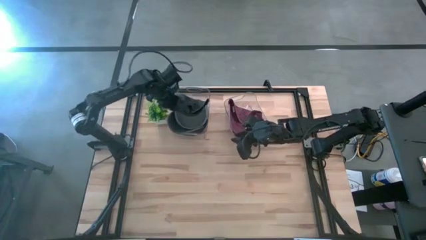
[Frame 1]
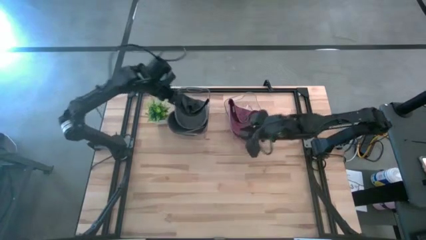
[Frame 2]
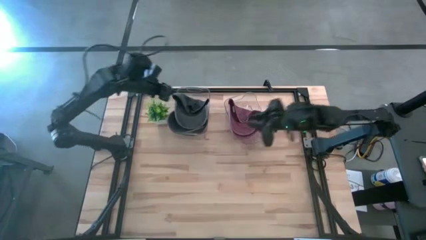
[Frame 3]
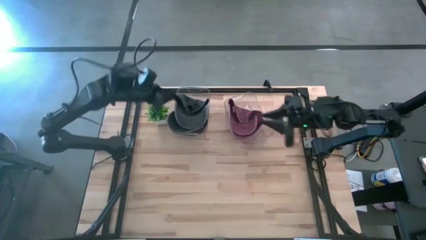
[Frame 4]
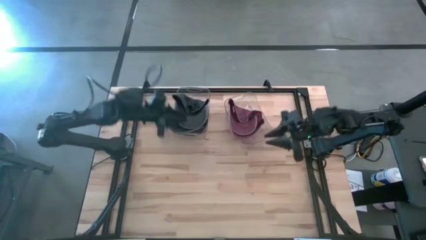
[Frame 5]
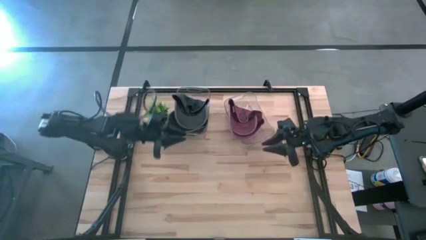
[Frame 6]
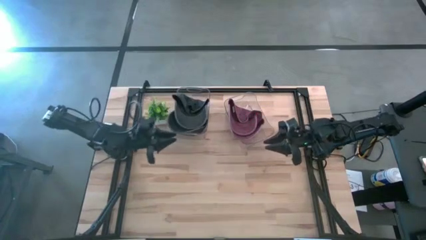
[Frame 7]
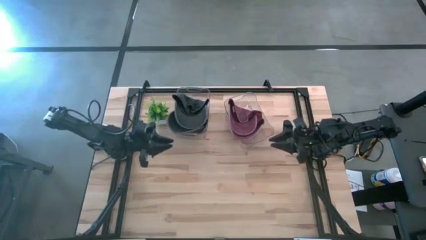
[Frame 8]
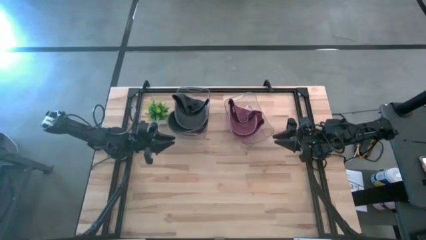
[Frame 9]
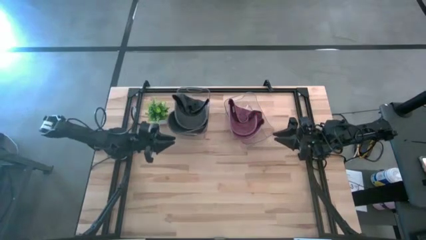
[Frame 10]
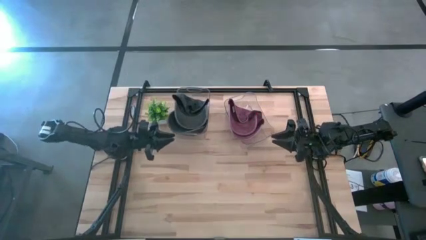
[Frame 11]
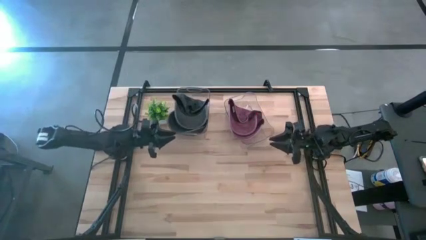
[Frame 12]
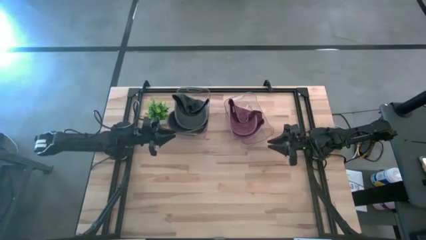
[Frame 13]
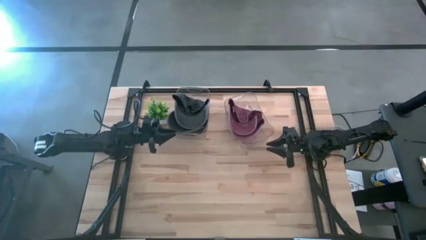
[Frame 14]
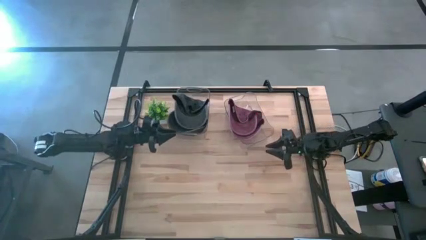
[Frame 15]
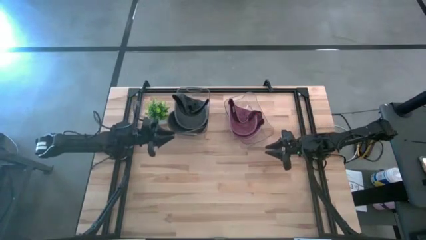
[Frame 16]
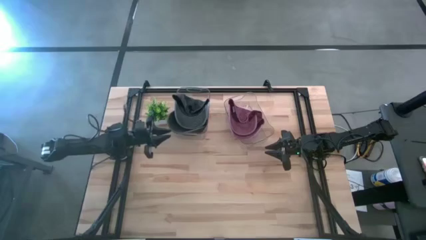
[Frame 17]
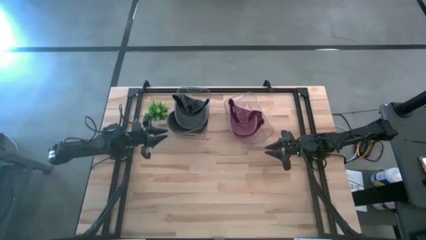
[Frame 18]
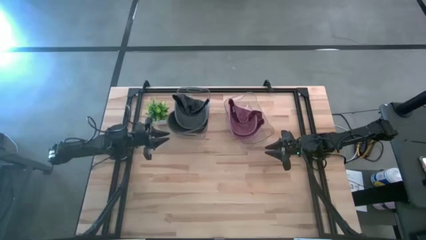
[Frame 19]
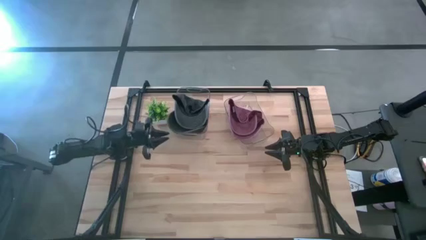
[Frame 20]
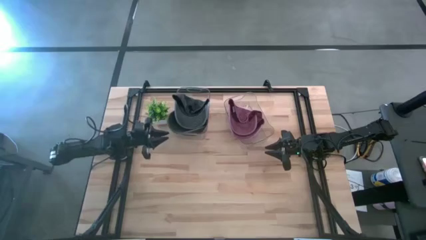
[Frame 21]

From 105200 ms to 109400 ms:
Task: Pick & Place hat
Return to Home Position

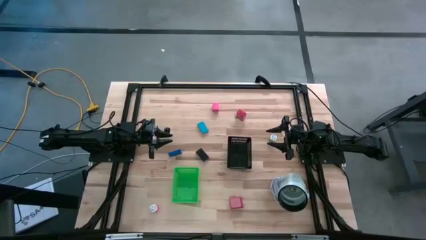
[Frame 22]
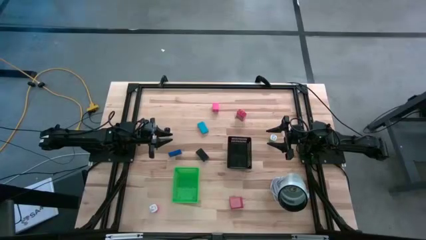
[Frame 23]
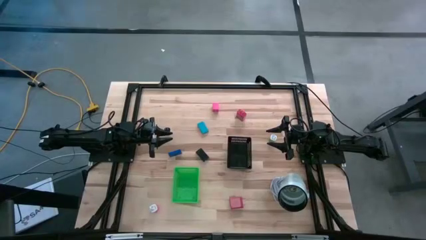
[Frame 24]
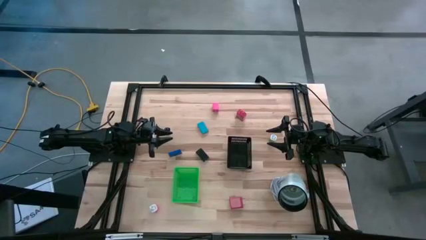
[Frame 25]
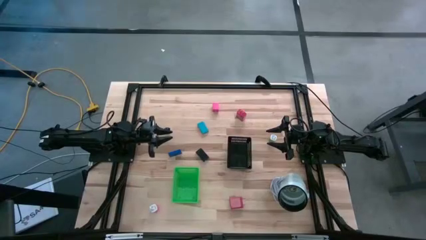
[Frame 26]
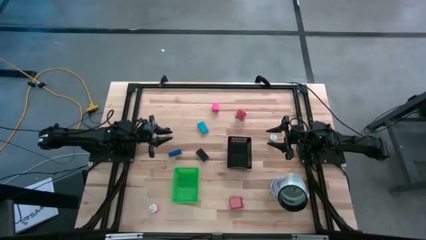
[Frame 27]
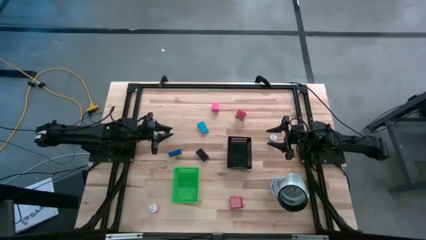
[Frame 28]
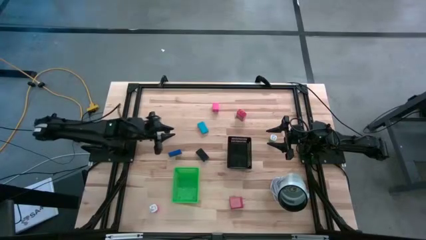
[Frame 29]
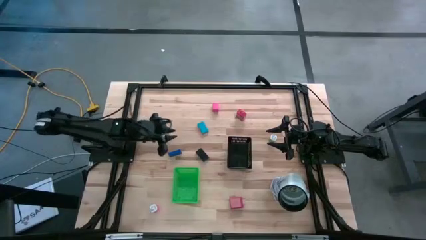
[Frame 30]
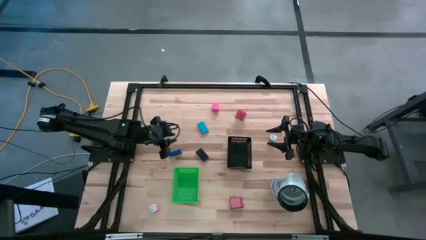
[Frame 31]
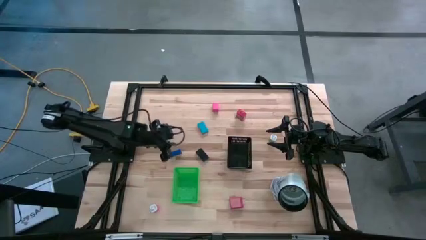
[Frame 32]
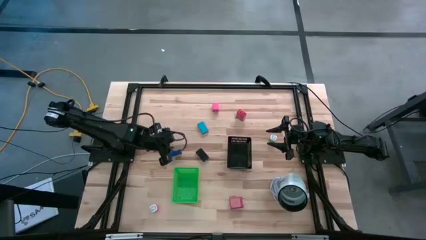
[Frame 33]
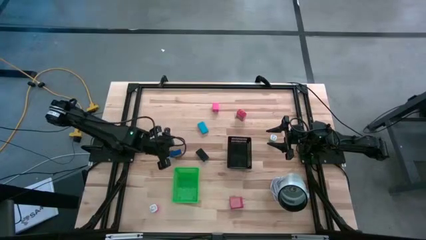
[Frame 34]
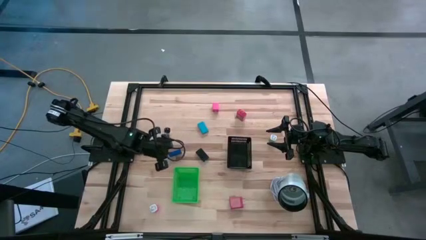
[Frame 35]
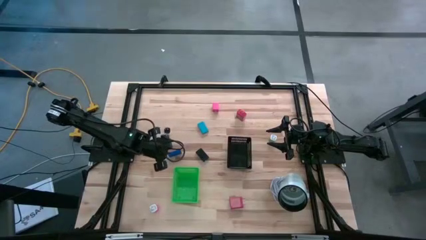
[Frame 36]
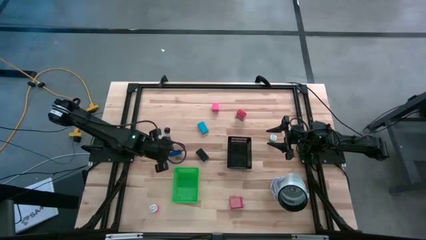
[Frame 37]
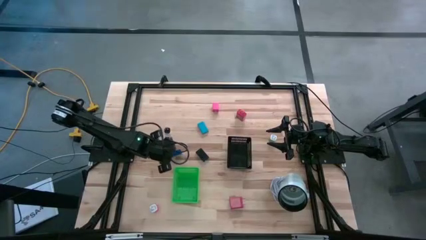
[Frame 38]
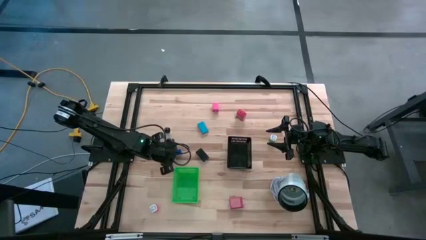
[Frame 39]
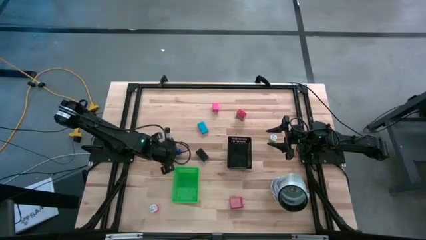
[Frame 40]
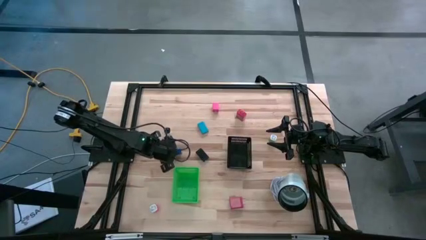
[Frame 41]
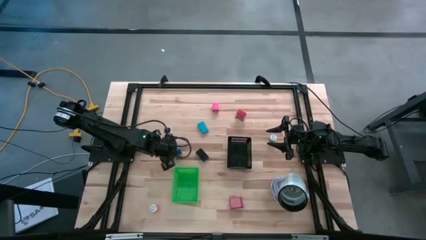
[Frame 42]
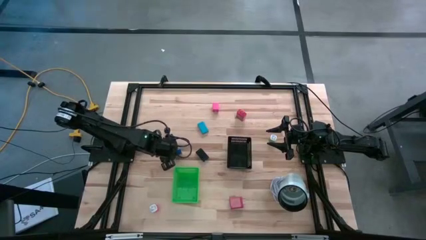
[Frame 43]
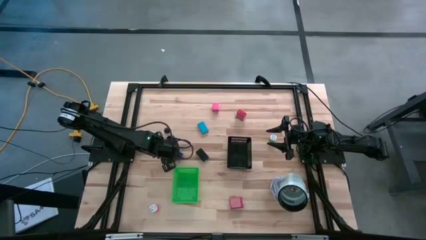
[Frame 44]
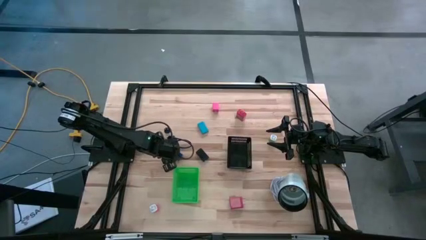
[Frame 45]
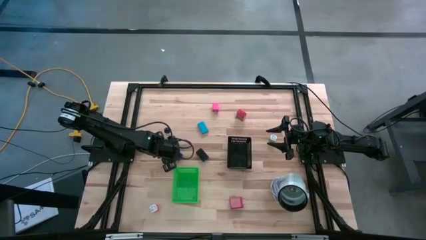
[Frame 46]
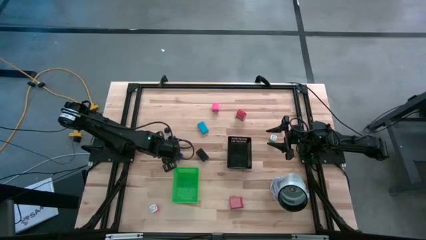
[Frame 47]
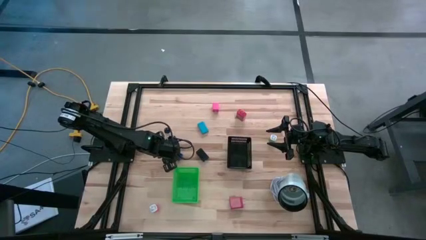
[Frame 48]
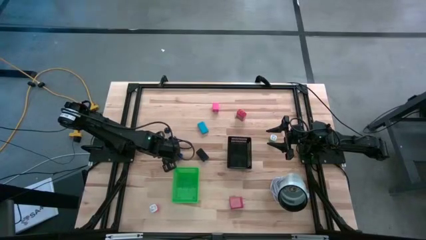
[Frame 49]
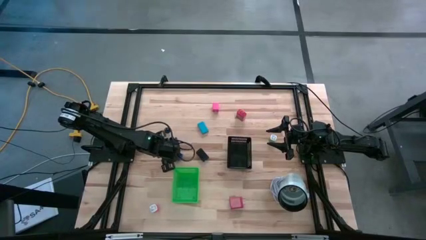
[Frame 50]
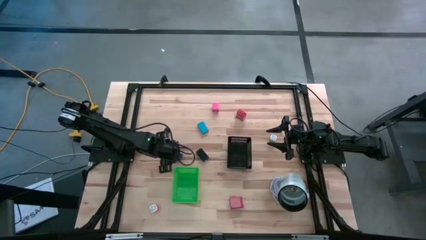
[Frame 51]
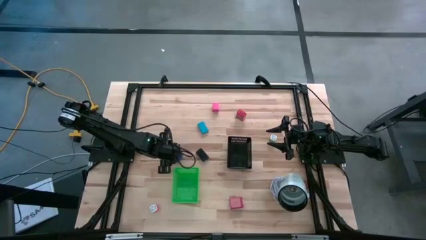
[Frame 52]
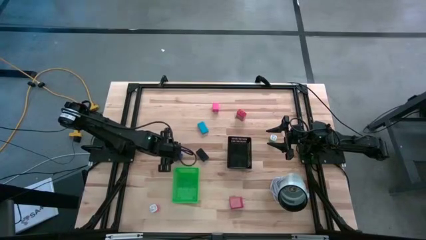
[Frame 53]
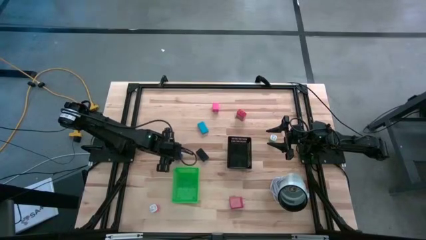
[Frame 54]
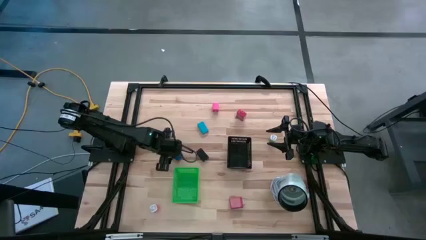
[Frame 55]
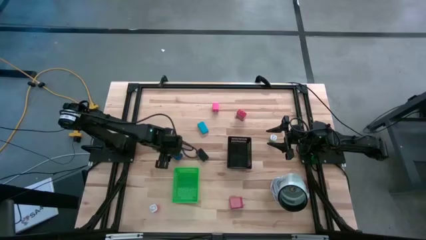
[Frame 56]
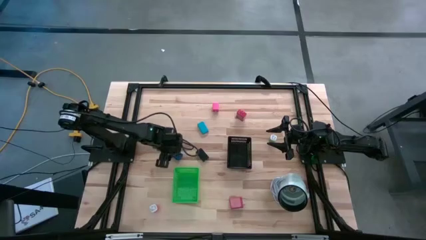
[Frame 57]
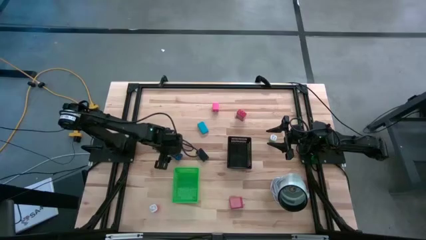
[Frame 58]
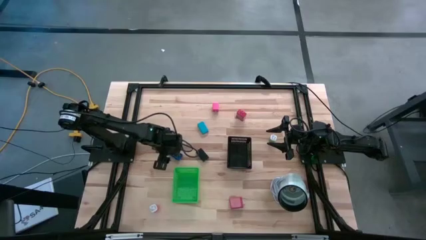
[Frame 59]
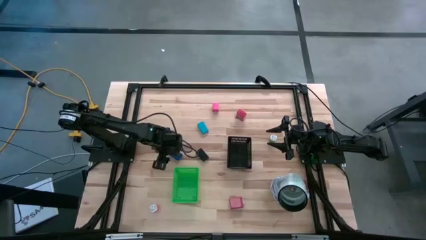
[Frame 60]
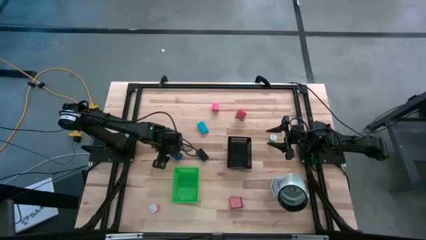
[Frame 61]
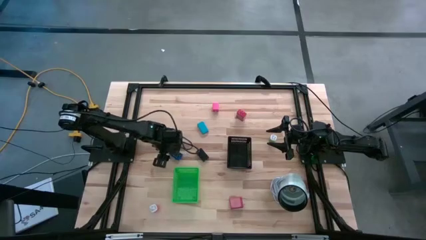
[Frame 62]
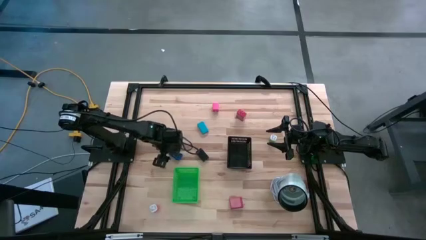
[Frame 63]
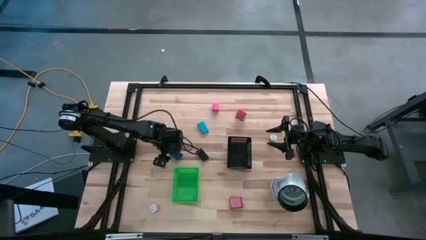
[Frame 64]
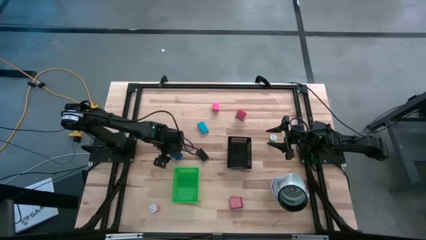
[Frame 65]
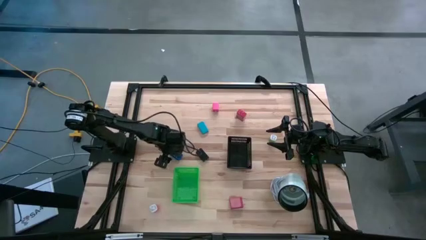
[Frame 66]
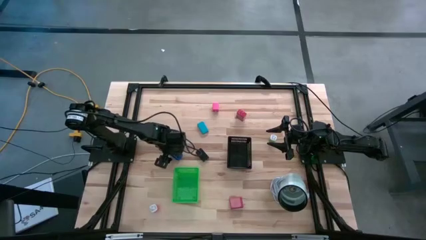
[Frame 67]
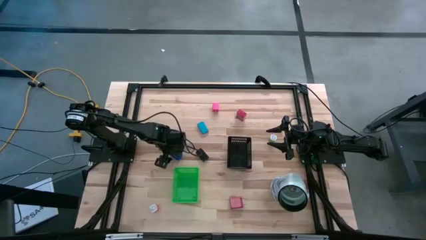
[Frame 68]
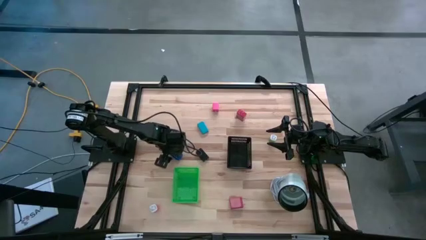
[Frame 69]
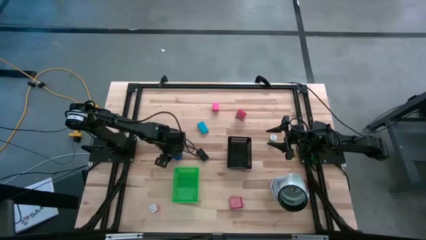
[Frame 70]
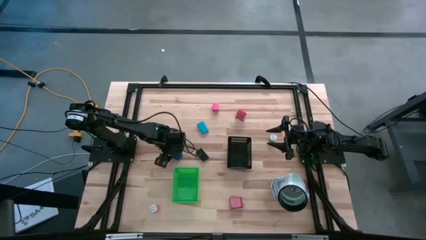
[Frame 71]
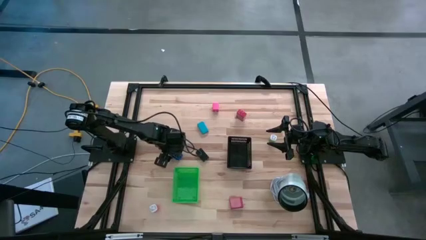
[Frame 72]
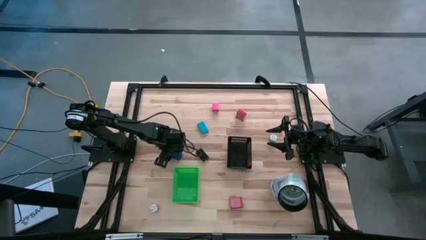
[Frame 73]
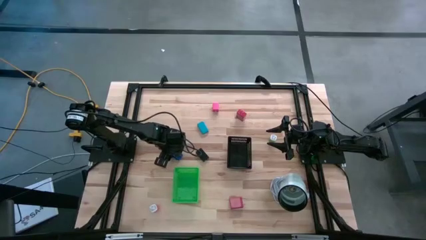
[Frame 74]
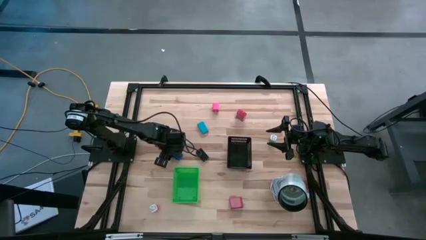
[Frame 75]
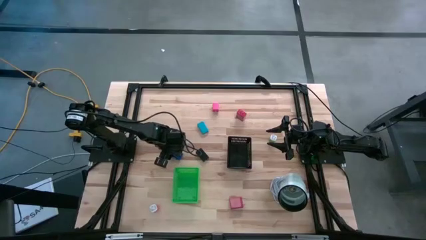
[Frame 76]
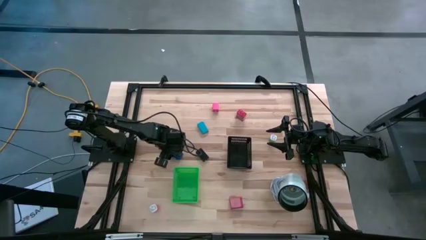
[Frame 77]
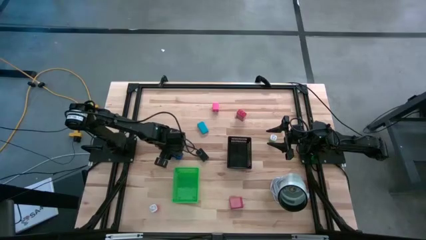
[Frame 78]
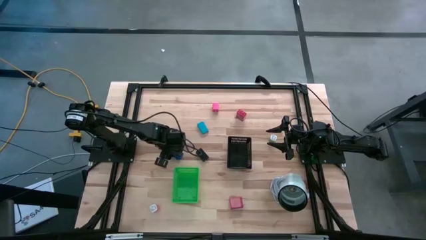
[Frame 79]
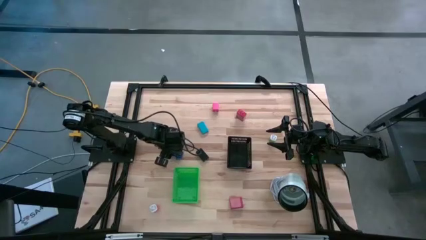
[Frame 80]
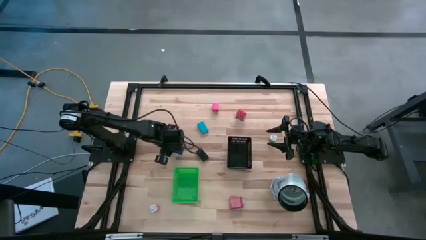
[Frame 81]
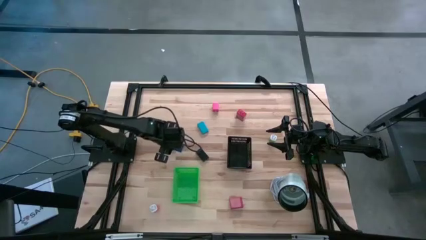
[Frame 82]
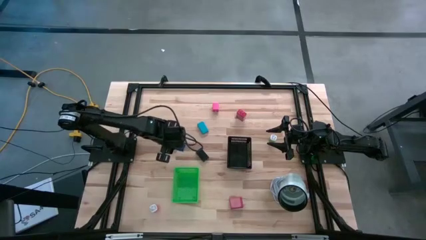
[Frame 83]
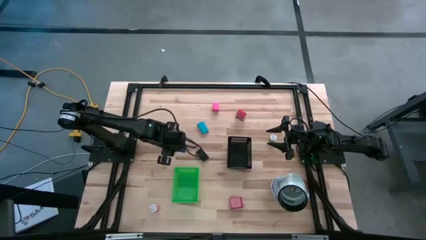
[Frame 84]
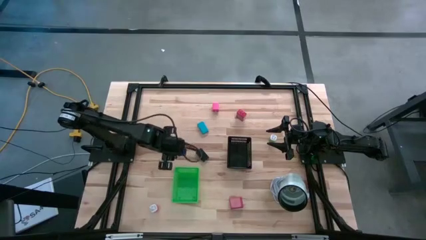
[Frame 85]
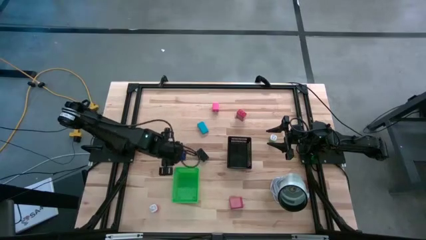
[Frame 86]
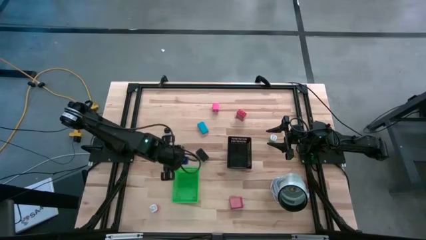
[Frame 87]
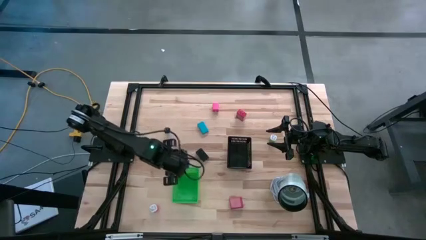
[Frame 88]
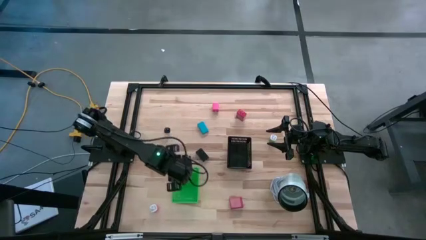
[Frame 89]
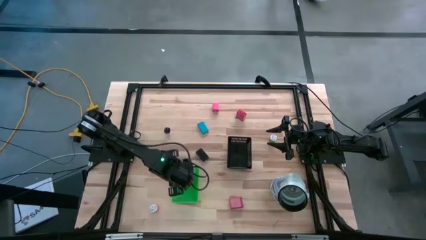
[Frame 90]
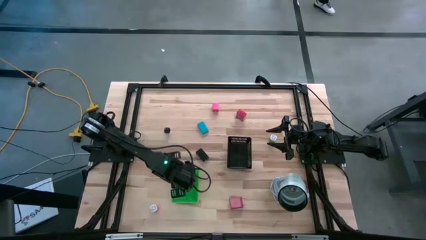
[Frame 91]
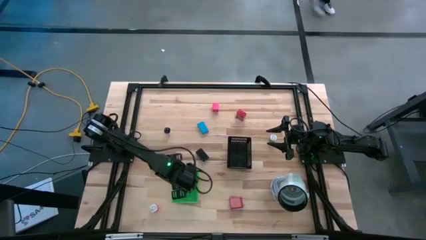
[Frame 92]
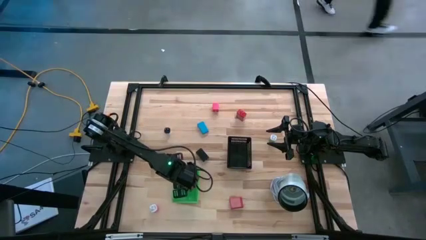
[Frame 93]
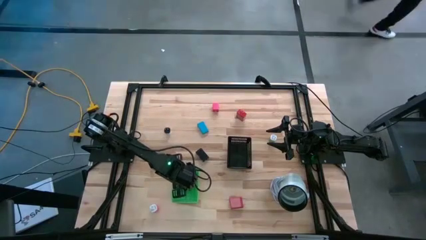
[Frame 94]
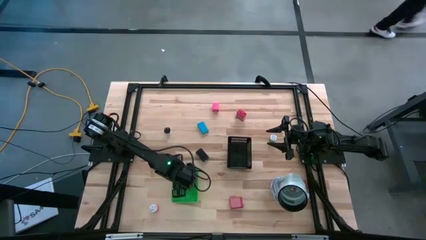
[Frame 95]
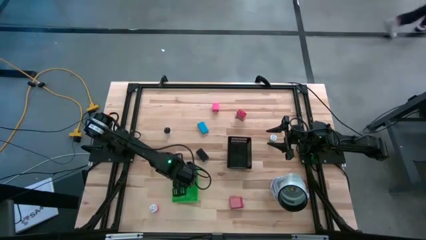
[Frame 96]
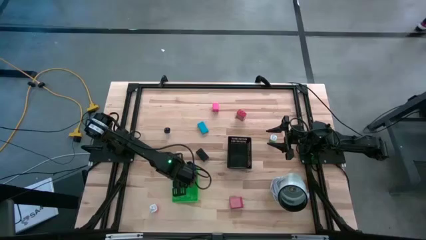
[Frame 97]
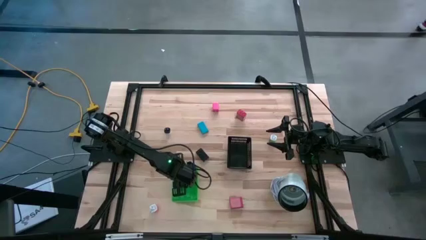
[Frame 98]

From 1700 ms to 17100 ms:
Task: Pick & Place Office items
Put the dark blue digital clock into the green bin
